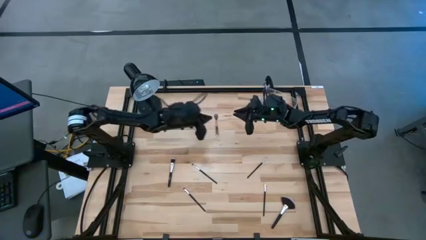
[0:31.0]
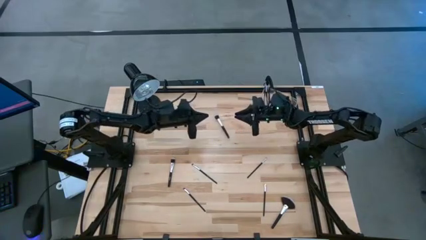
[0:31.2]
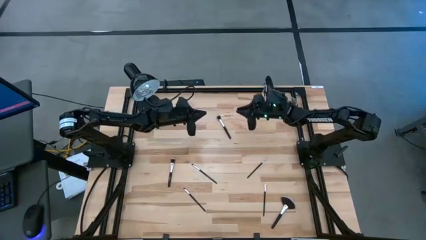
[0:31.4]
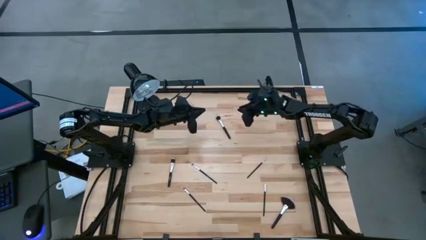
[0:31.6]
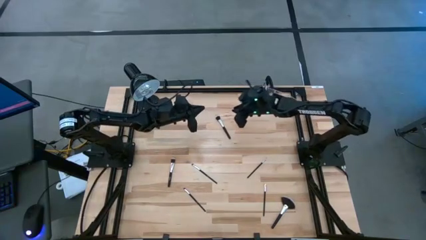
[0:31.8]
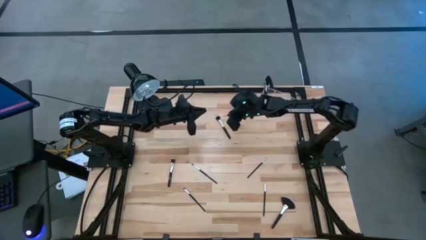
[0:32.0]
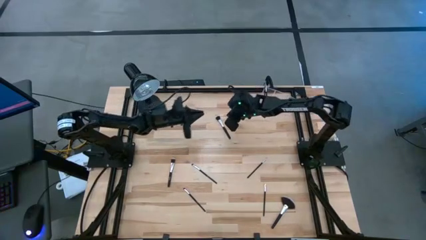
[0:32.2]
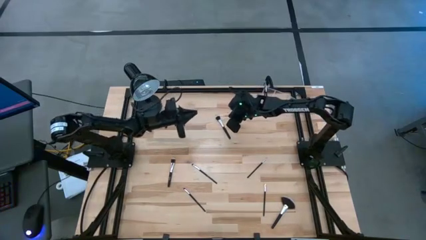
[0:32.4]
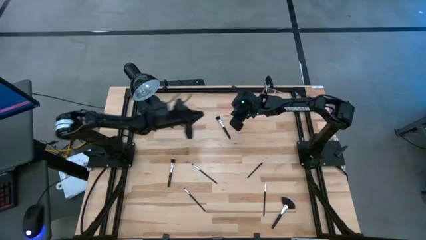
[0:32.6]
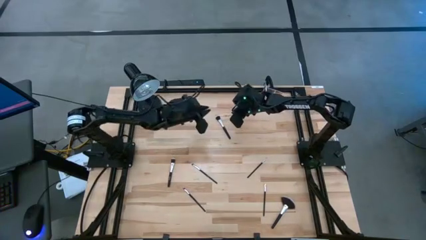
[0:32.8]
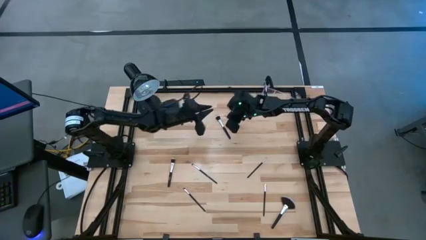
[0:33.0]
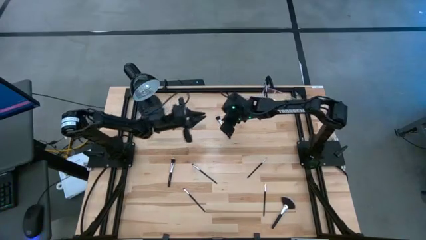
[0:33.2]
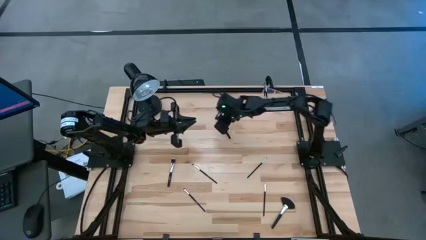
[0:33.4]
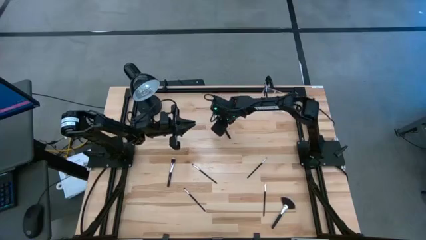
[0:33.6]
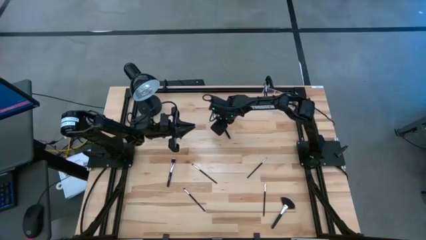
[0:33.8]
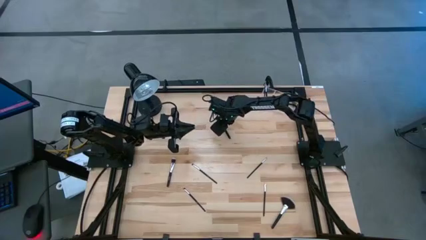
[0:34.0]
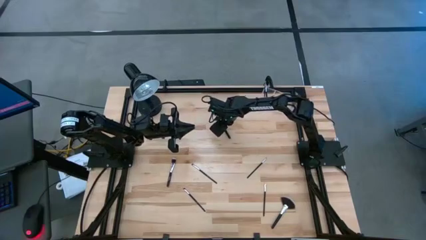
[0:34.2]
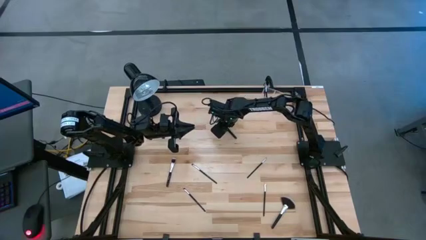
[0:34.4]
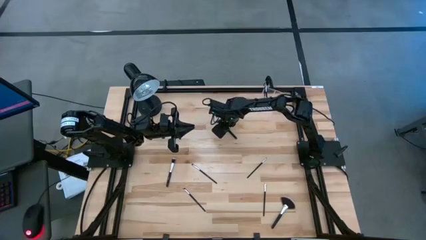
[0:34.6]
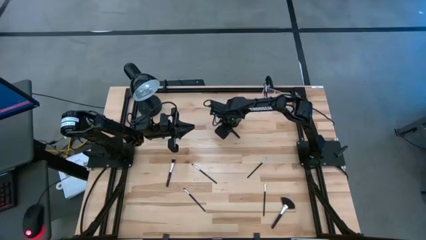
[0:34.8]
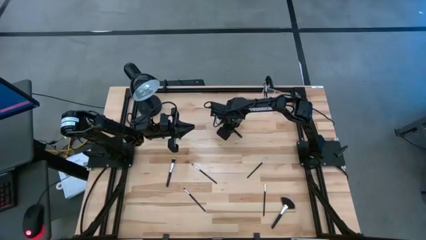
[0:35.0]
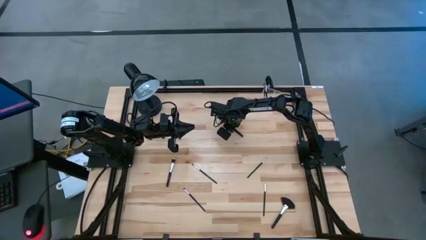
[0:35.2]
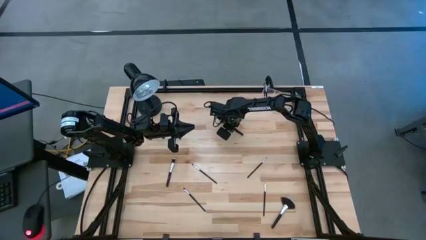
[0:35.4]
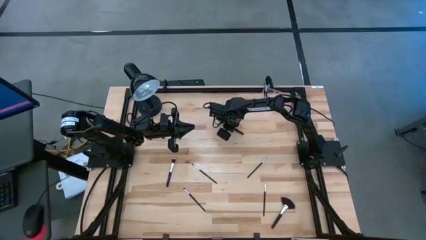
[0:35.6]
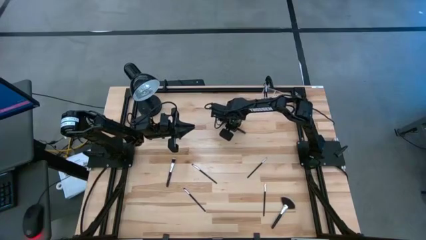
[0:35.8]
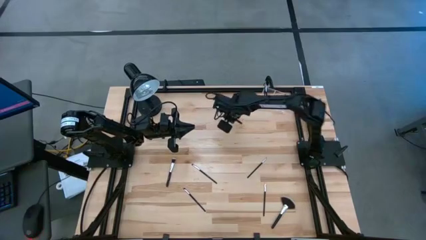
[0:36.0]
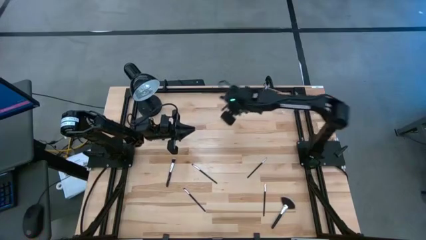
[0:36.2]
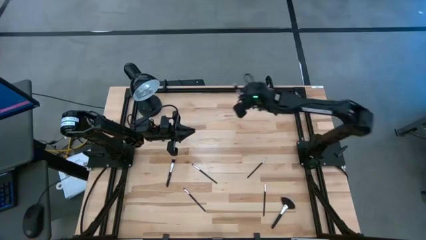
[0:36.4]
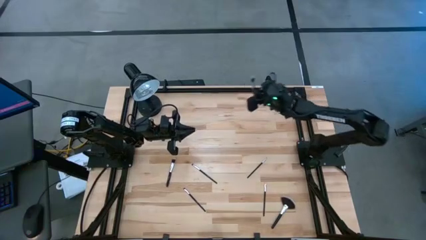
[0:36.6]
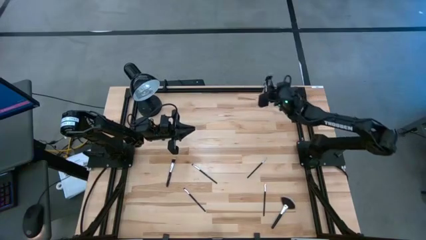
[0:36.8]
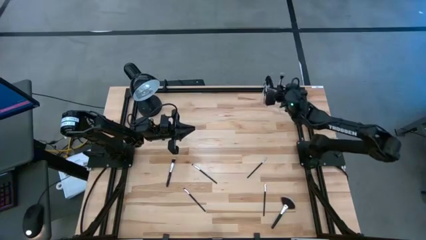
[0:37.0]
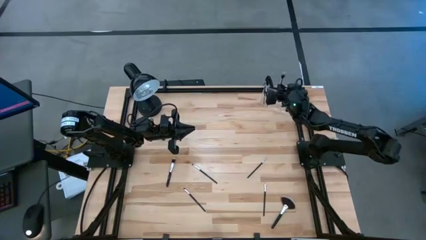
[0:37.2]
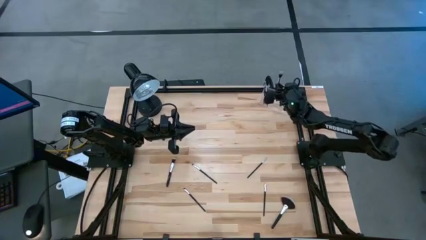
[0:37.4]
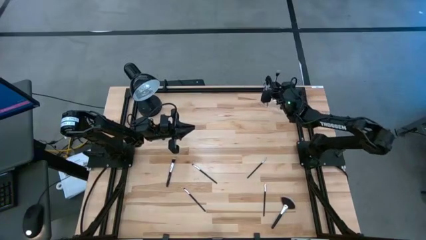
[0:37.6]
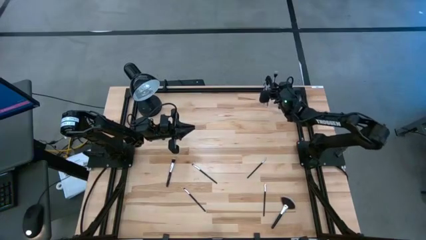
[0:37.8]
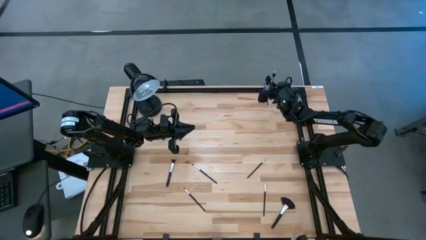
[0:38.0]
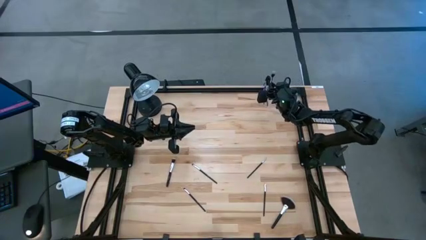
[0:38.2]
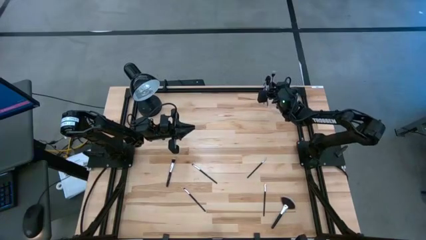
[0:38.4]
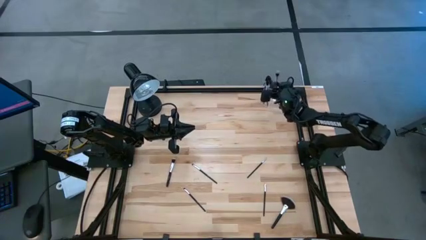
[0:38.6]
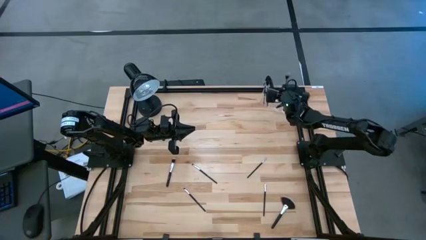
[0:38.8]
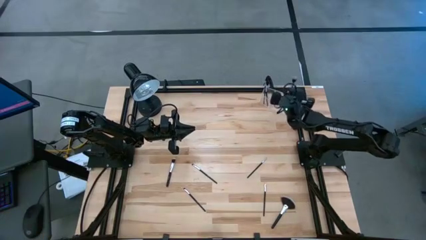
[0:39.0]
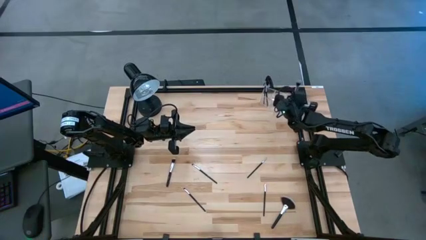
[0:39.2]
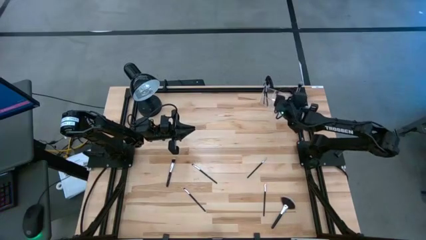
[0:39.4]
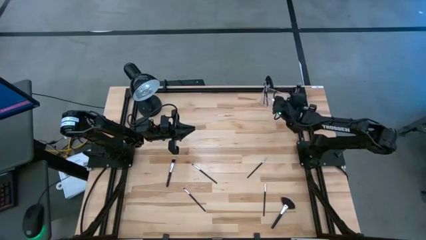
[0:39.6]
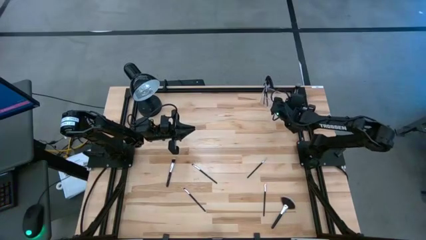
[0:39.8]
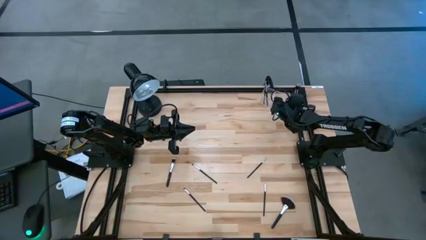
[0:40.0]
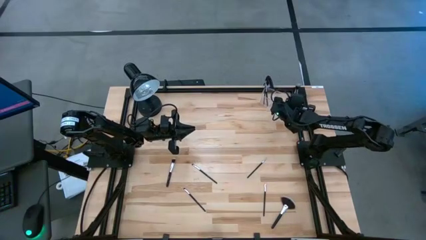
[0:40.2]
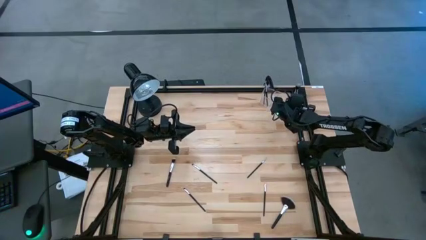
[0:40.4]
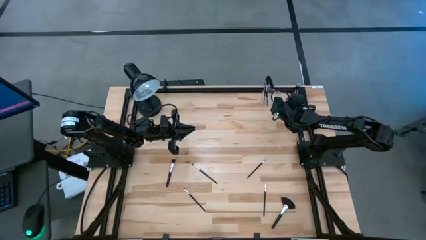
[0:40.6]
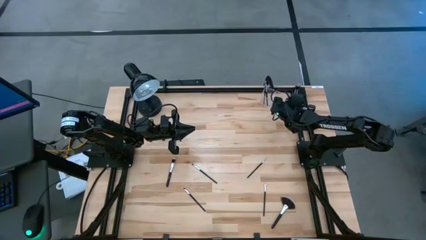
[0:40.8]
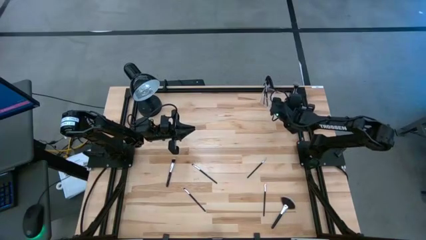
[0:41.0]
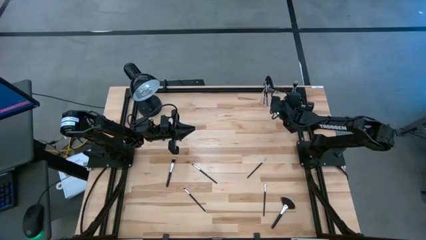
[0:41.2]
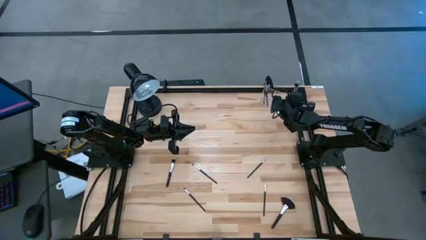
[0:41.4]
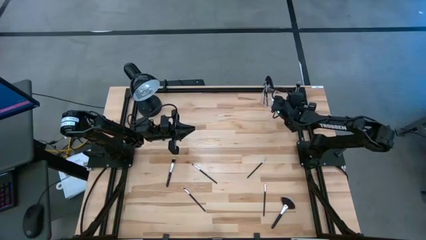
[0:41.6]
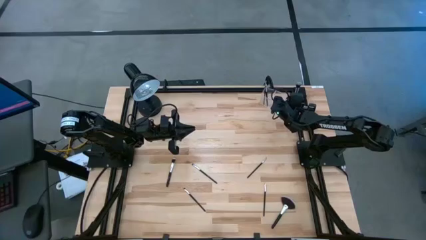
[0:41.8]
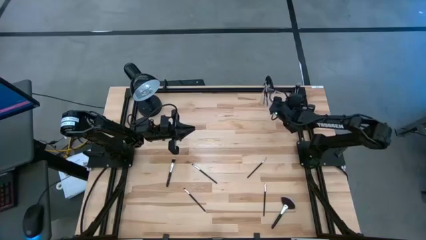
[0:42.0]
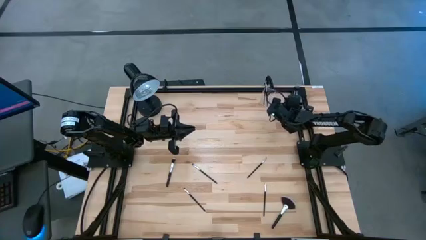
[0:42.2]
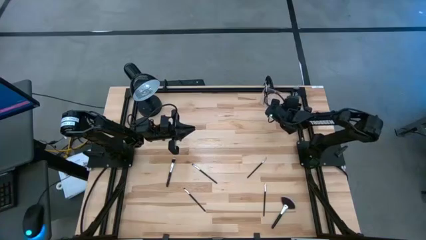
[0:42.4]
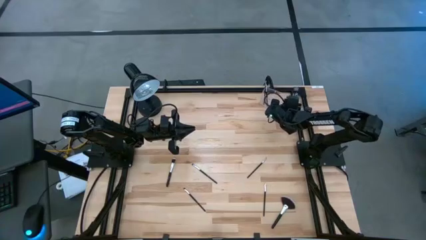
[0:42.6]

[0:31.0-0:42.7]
Task: Sort items
Put the powder brush into the transparent organizer
